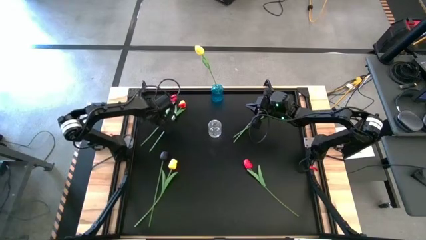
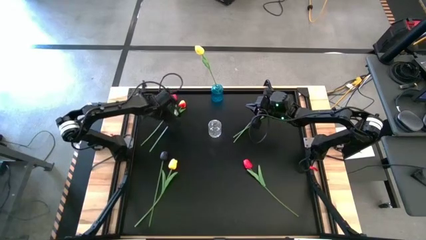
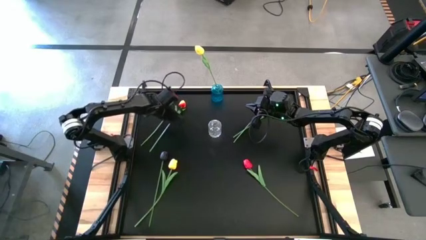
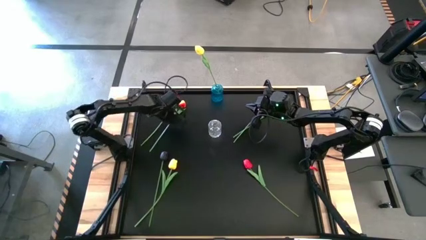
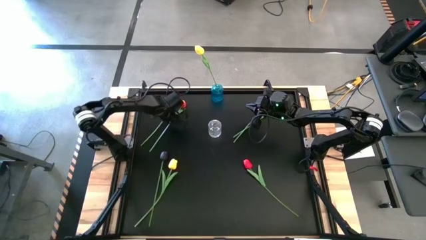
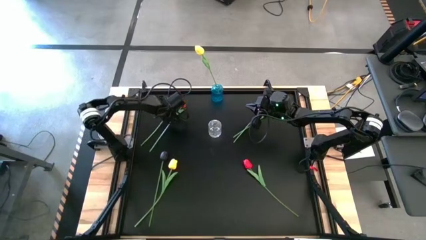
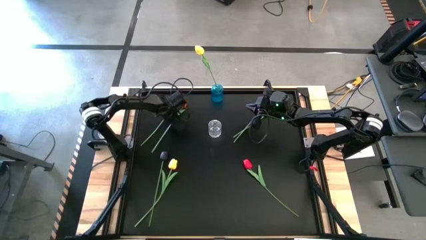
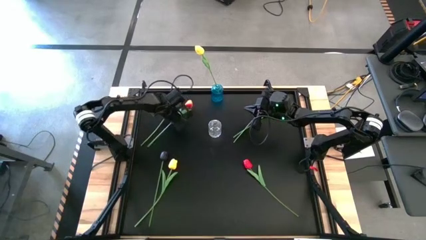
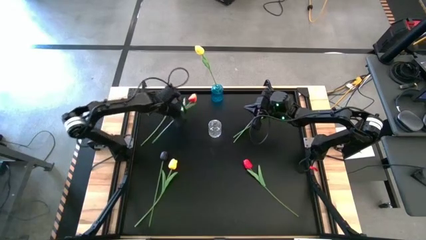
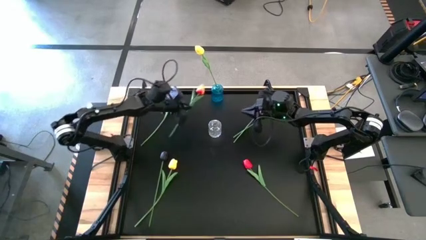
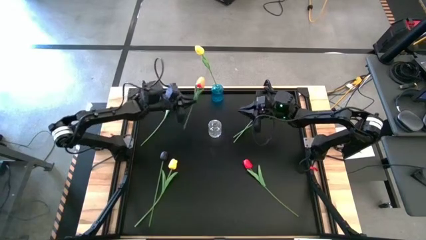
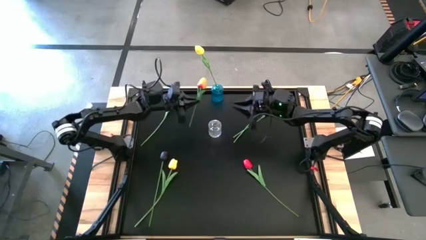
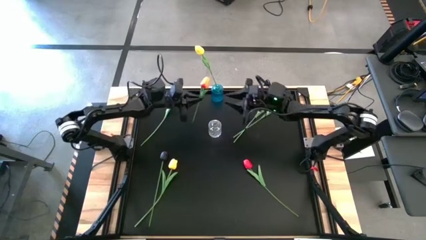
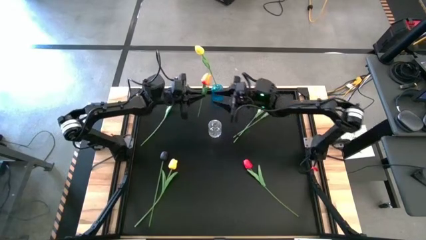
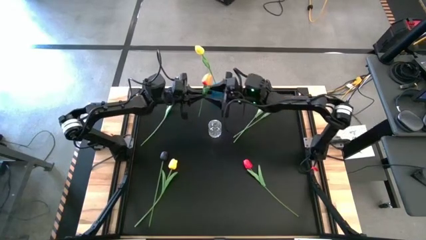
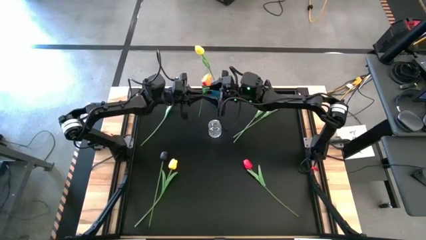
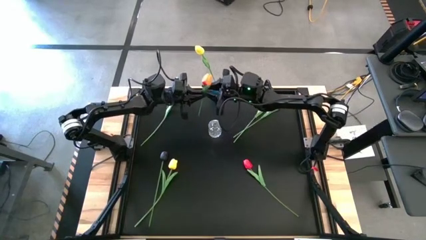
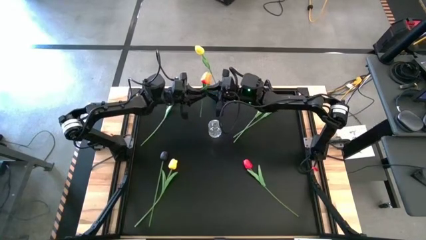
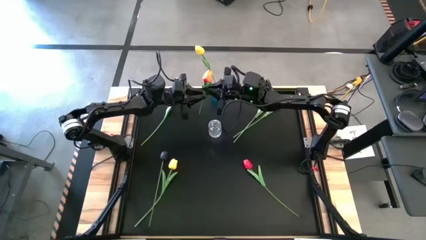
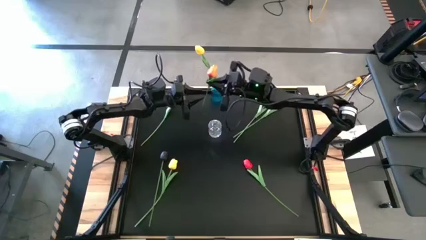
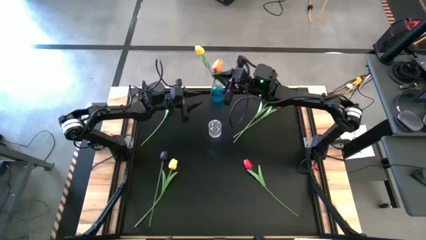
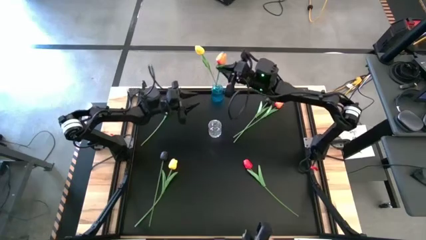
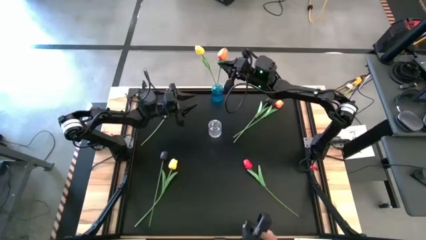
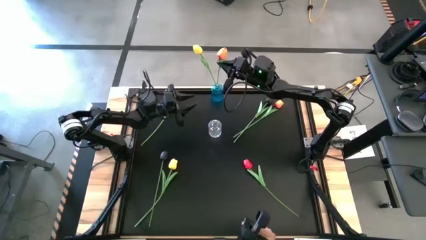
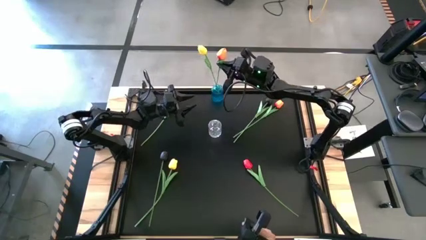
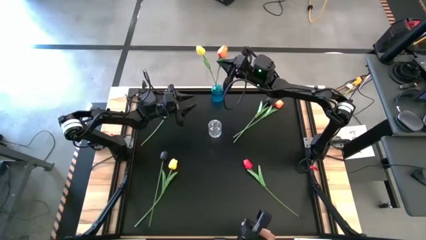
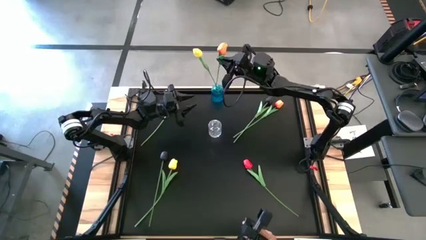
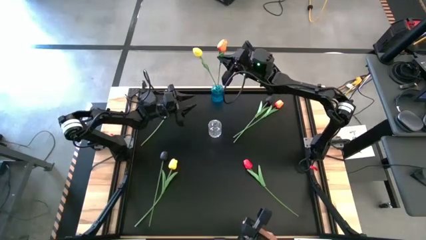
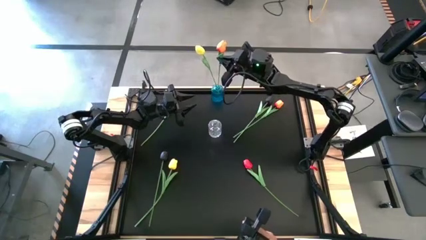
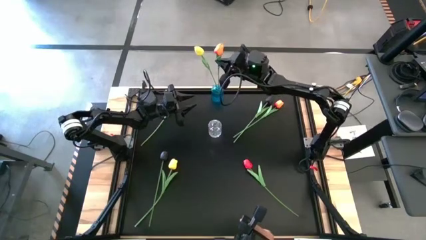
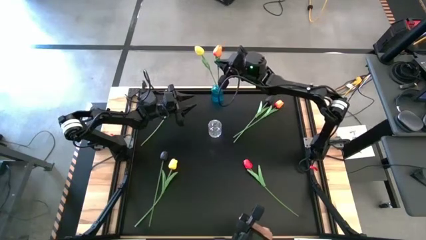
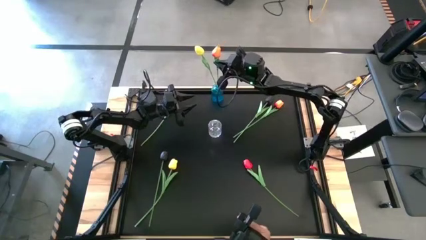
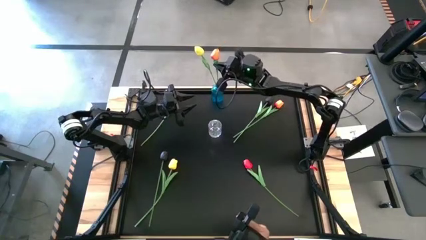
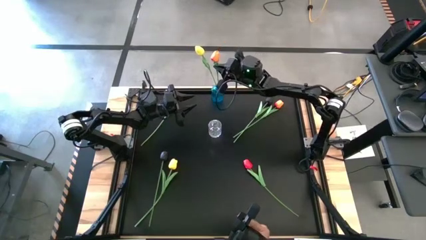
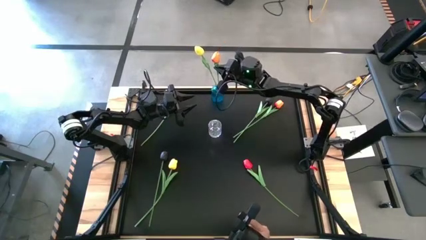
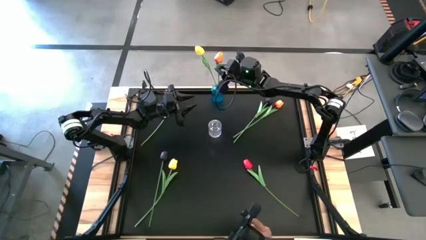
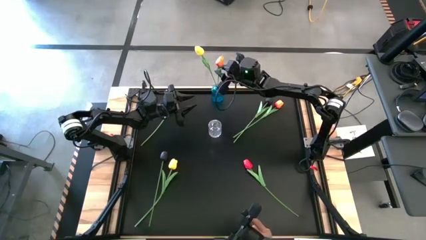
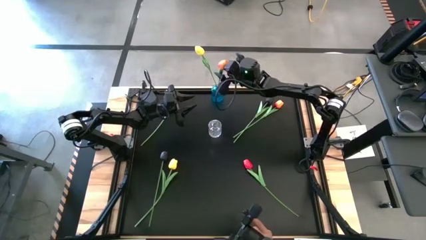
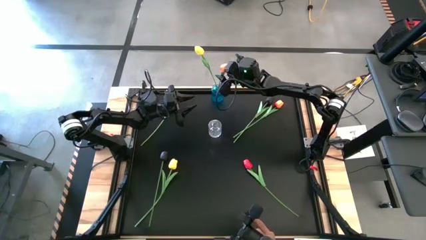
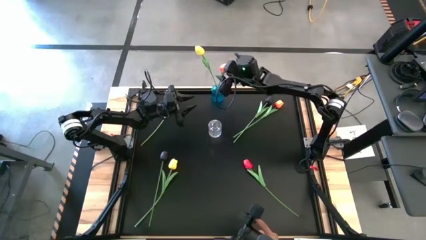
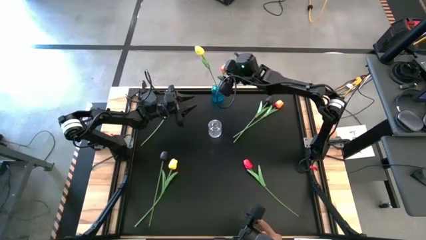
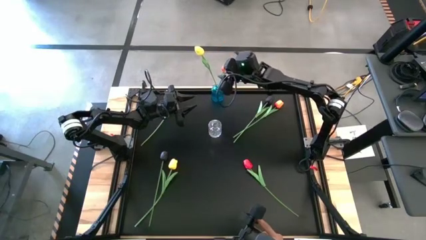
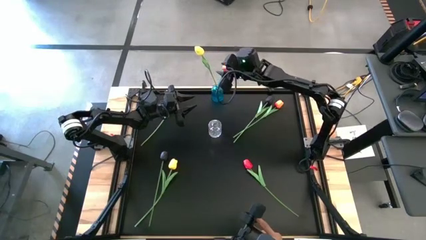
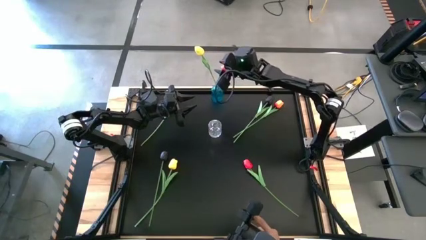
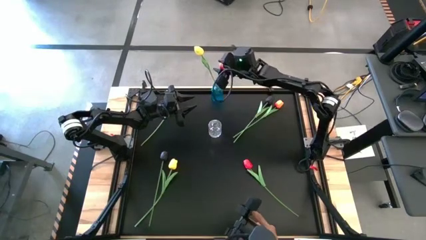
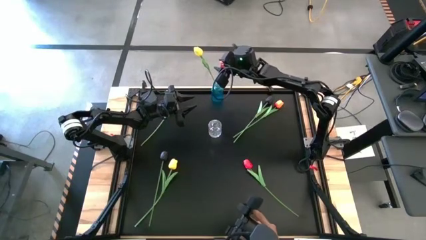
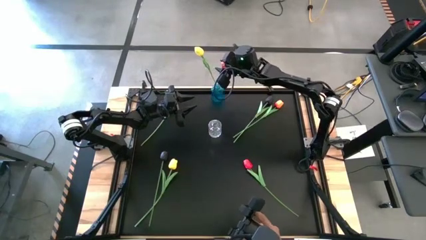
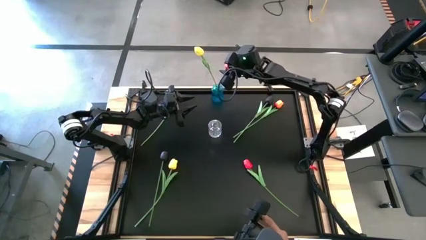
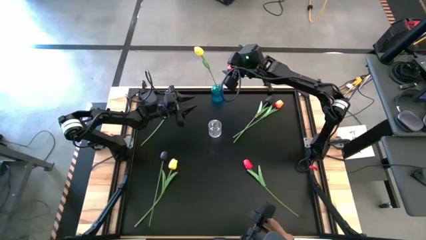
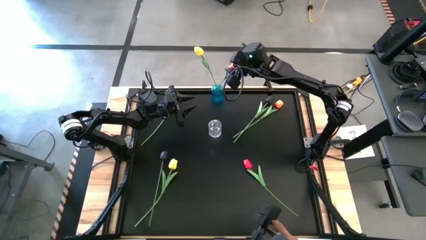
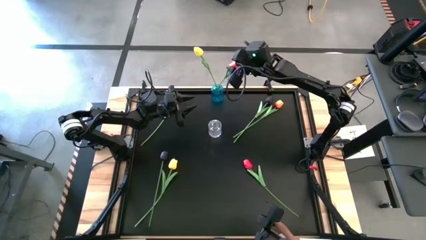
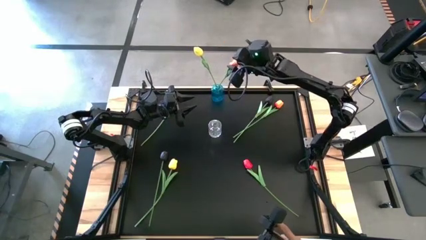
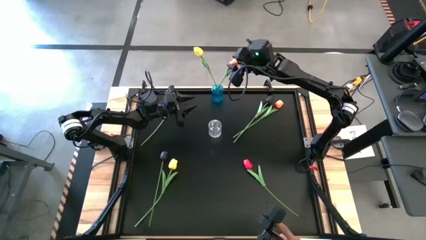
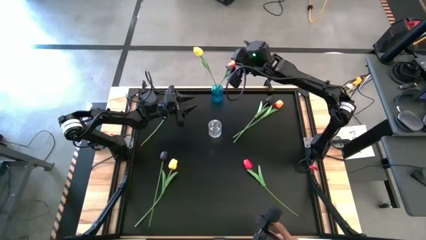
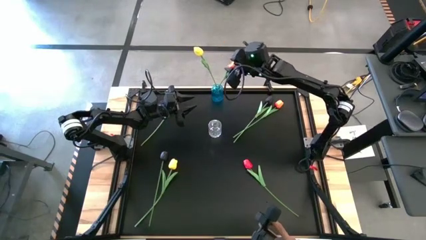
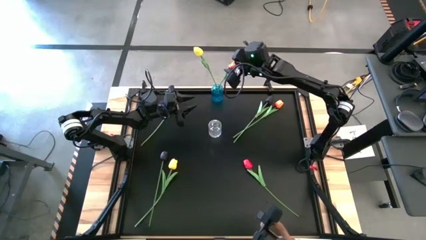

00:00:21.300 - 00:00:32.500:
Task: Sort flowers into vase by color
Put the left orange tulip into the blue vase
